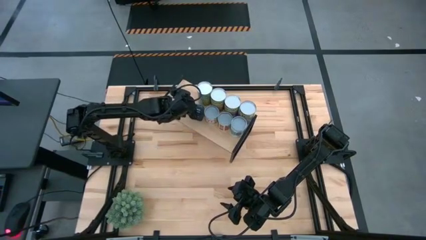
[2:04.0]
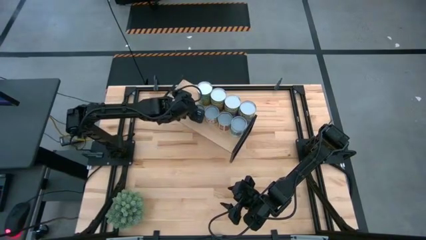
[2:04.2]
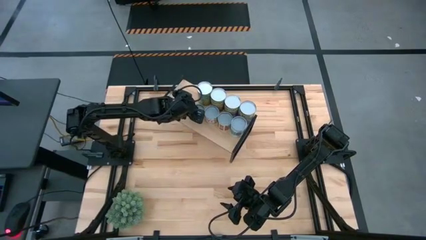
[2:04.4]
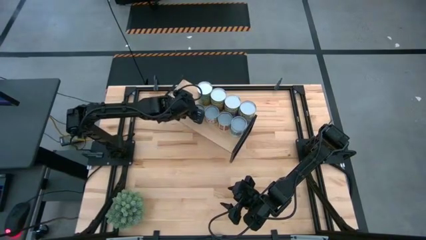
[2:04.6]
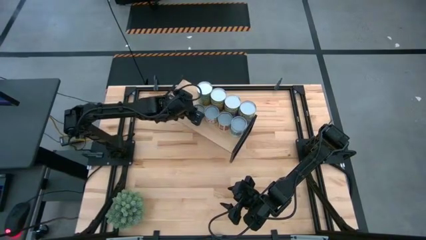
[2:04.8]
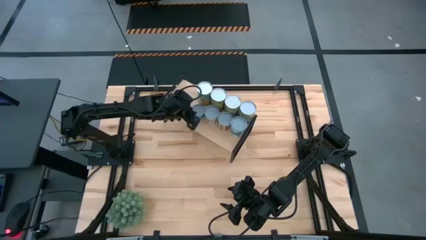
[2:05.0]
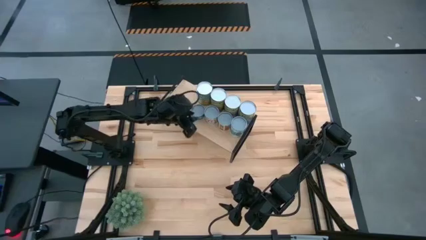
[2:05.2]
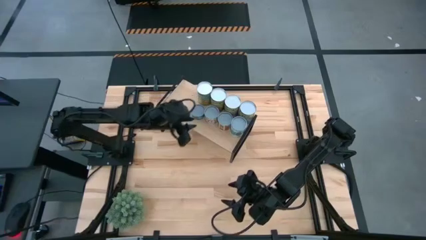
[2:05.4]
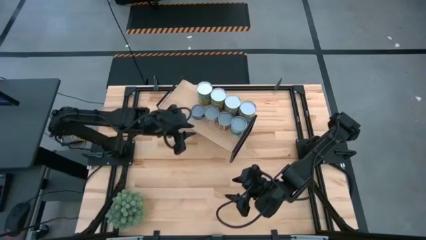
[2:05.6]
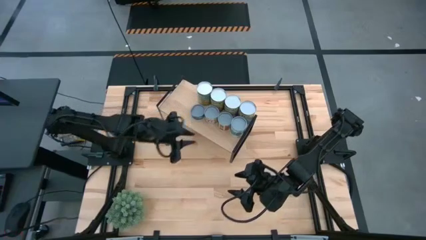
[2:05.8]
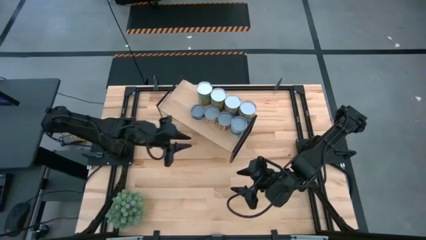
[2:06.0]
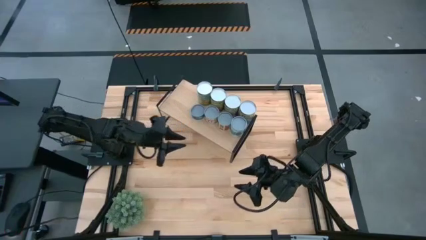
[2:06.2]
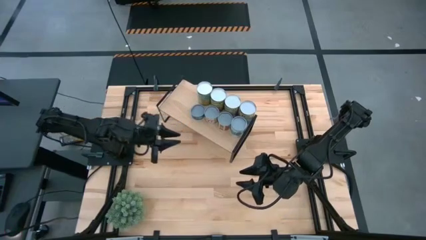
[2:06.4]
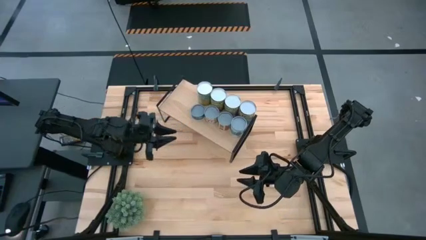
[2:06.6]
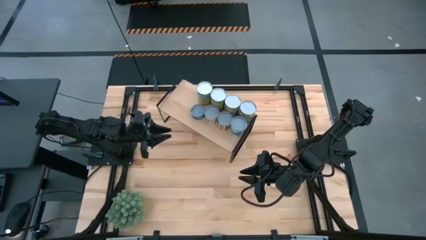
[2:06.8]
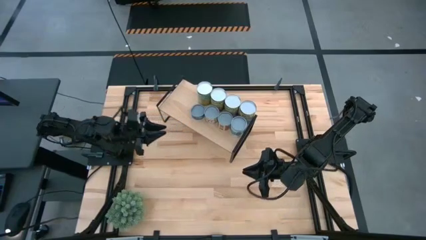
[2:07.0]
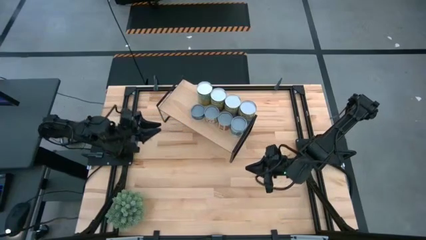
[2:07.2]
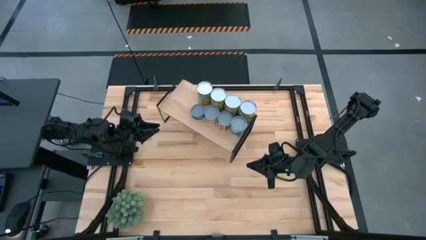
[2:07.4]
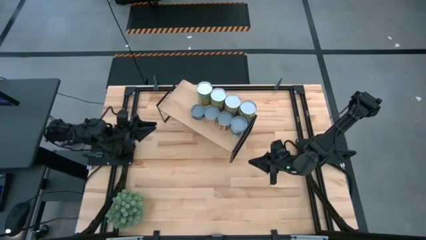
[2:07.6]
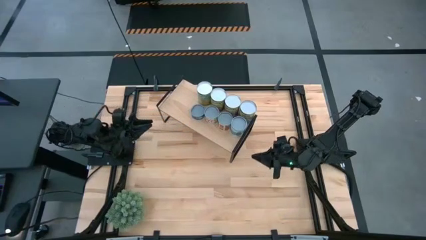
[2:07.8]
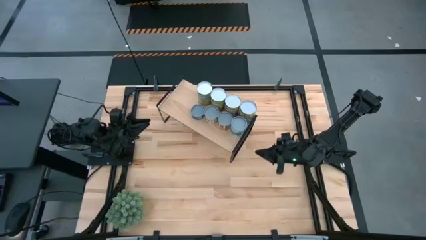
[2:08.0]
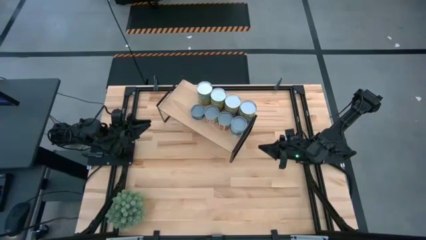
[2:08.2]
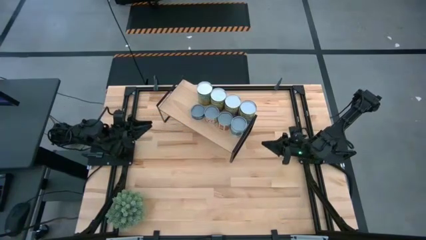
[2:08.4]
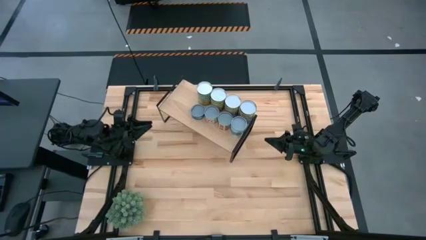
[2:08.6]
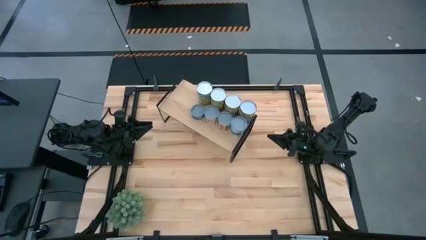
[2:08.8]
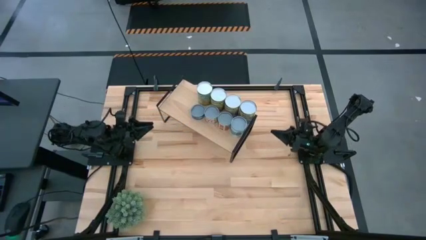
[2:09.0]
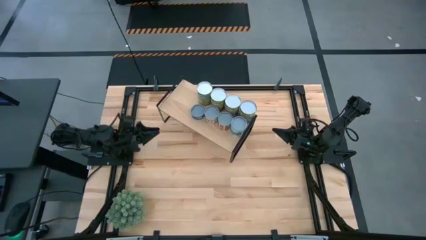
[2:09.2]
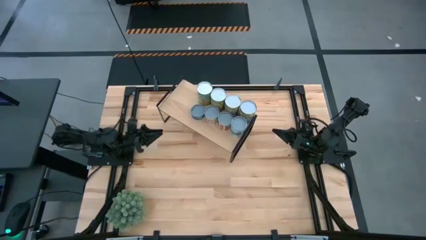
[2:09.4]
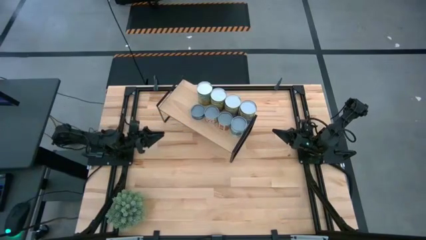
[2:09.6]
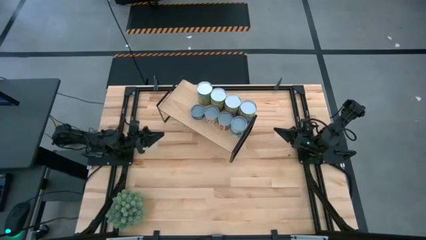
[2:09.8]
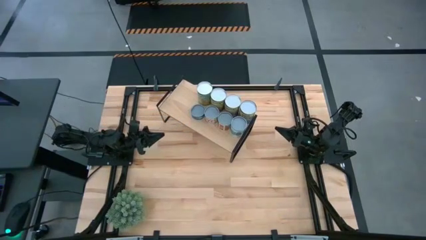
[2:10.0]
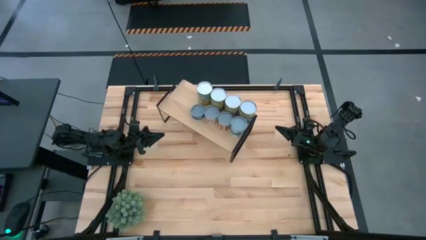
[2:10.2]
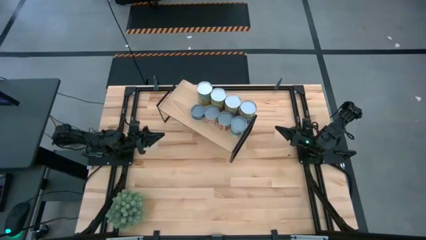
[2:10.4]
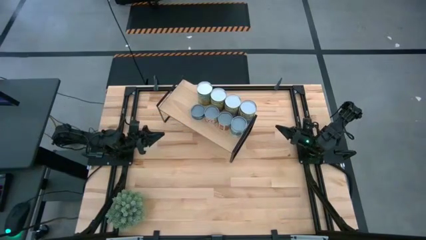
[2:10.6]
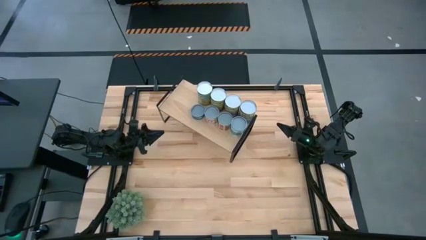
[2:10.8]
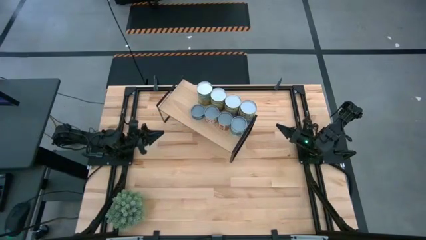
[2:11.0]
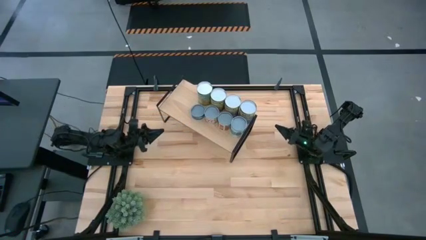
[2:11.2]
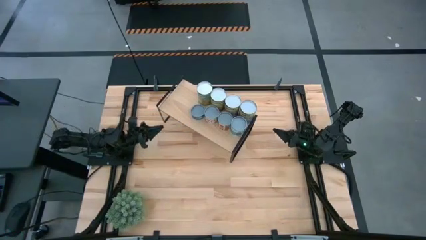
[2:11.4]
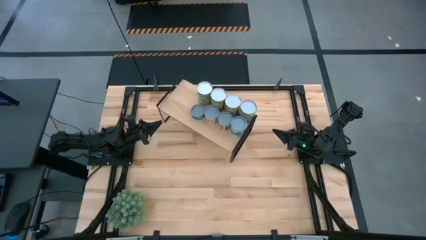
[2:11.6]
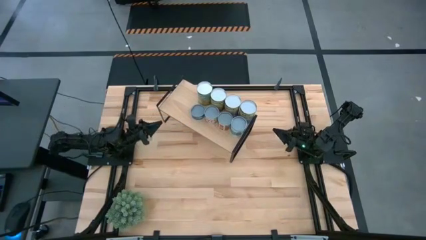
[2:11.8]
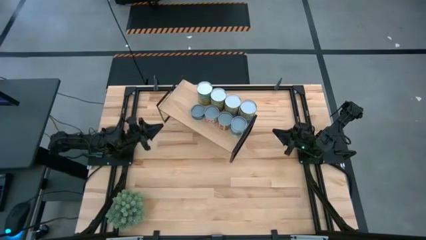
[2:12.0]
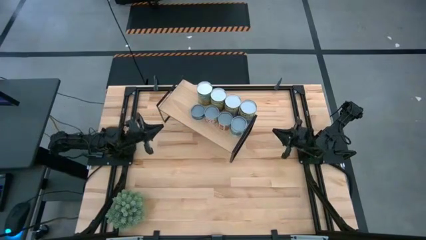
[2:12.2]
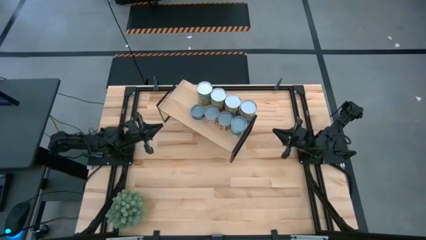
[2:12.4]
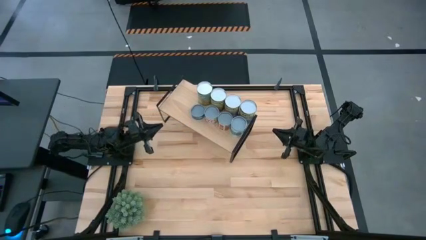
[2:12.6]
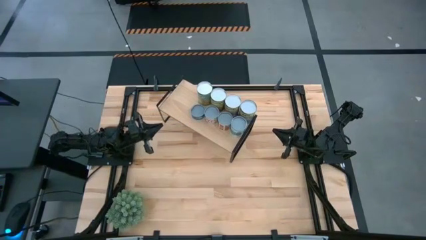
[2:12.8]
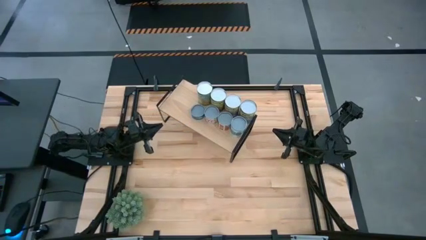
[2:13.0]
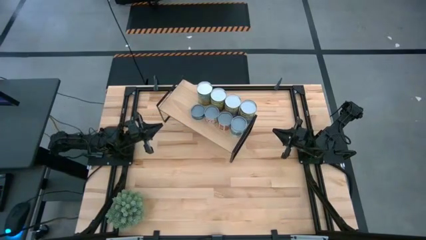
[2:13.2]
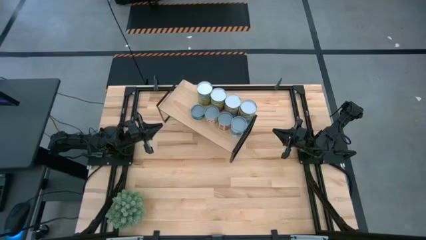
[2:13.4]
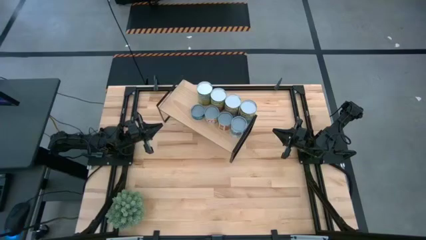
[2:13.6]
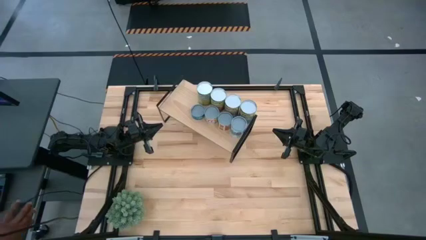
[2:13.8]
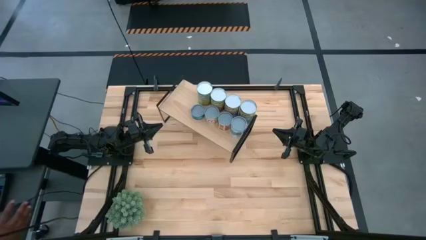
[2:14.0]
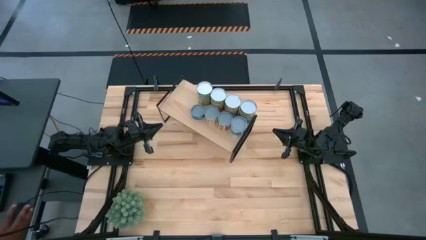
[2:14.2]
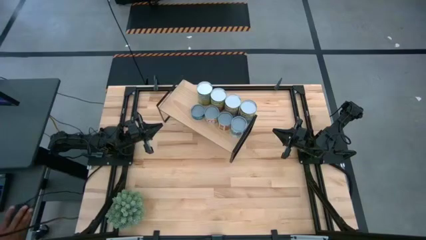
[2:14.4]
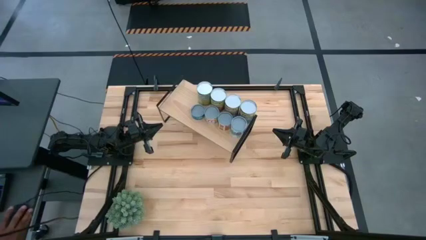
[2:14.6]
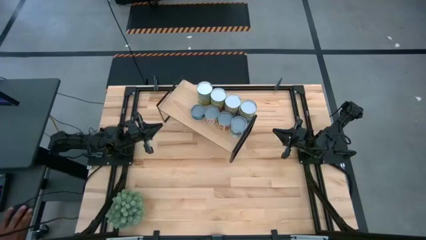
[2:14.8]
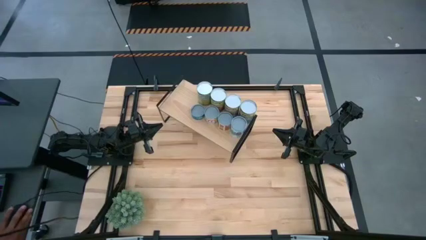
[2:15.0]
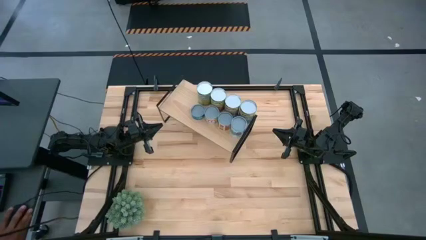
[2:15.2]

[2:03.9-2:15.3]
Task: Pick and place cans onto a shelf
Return to Home Position
